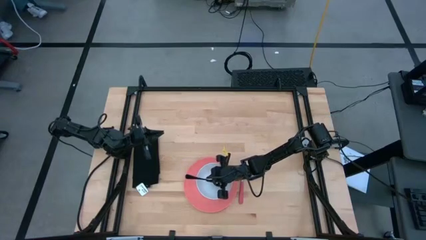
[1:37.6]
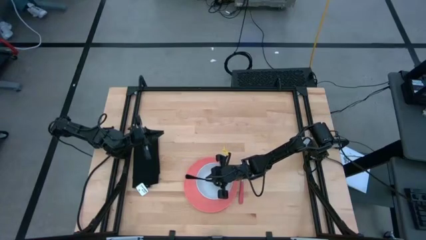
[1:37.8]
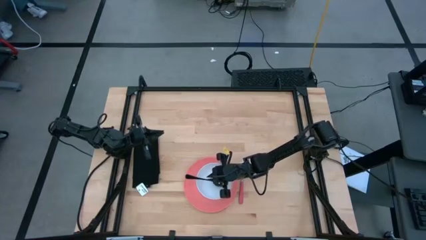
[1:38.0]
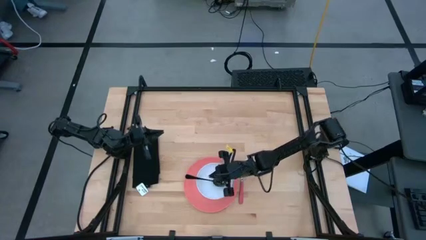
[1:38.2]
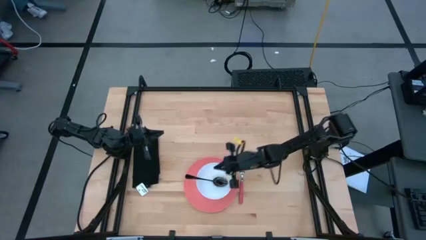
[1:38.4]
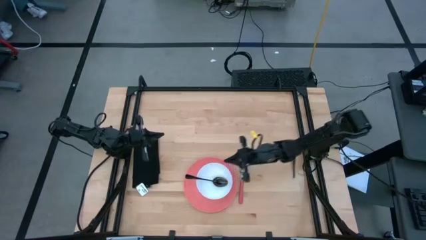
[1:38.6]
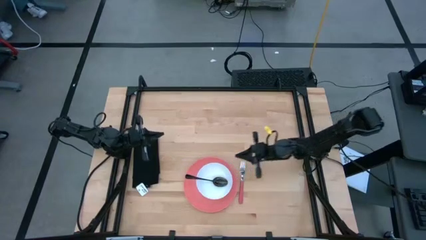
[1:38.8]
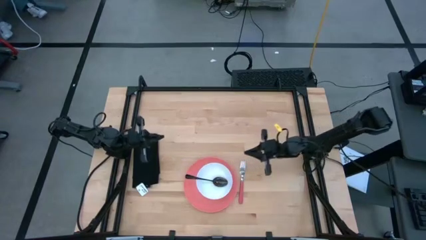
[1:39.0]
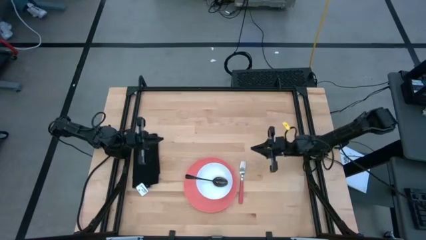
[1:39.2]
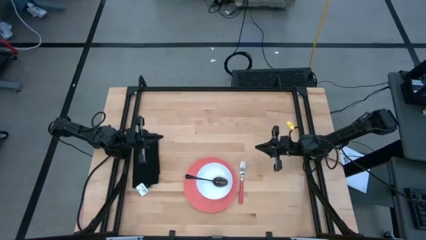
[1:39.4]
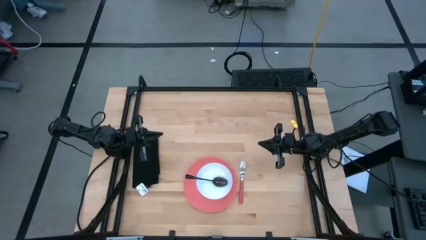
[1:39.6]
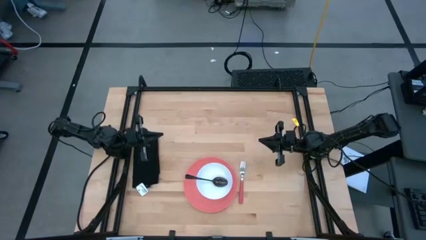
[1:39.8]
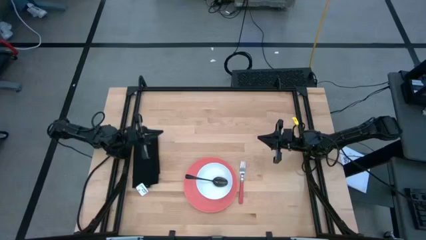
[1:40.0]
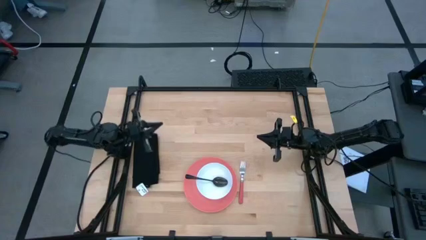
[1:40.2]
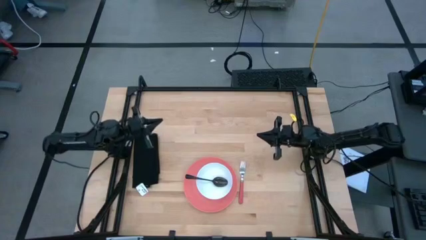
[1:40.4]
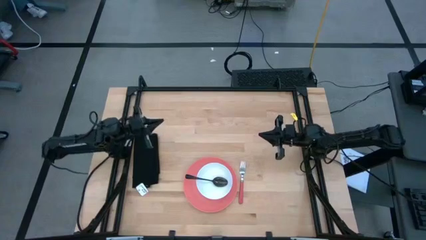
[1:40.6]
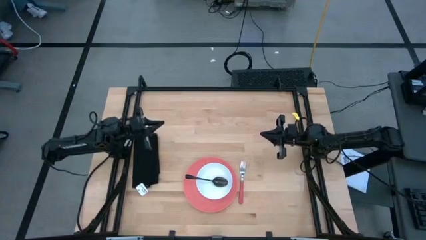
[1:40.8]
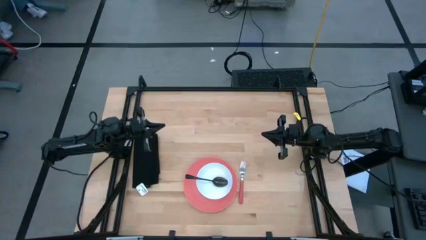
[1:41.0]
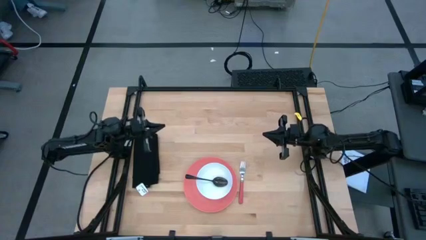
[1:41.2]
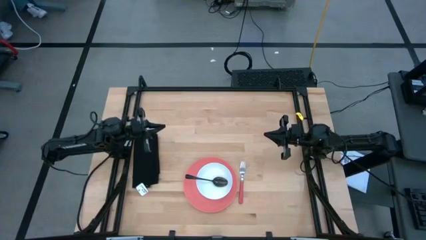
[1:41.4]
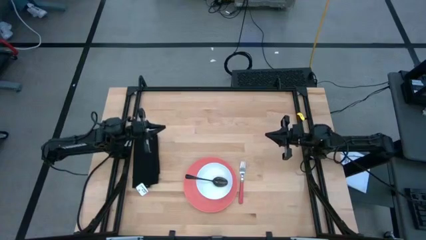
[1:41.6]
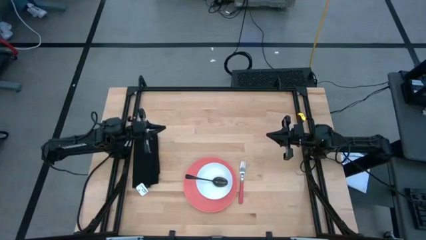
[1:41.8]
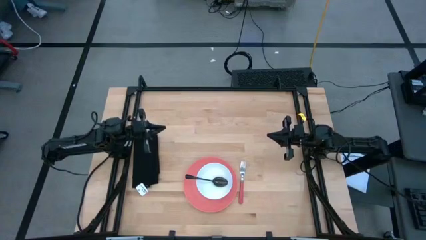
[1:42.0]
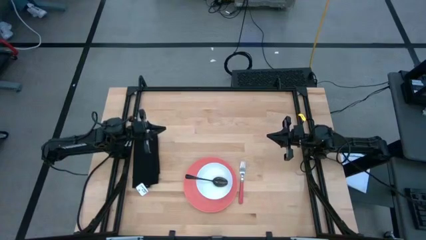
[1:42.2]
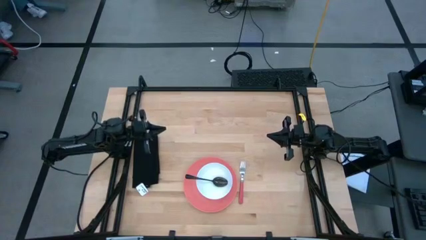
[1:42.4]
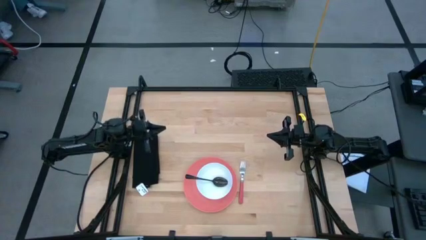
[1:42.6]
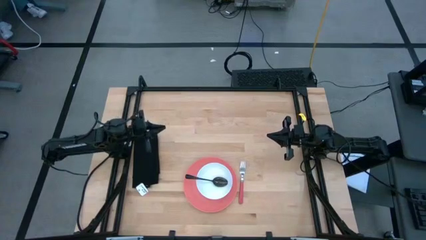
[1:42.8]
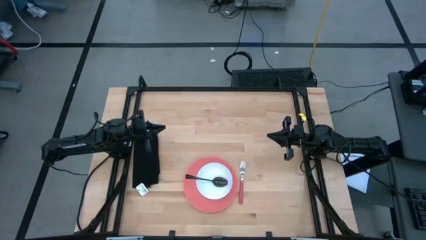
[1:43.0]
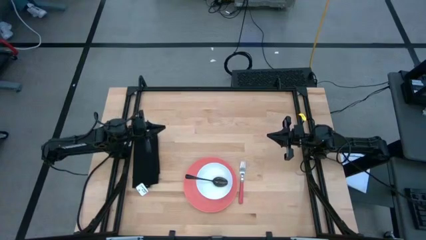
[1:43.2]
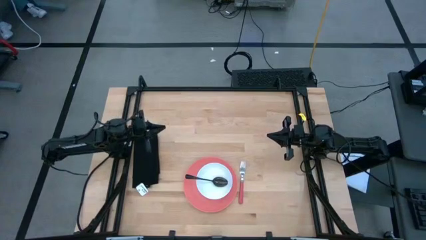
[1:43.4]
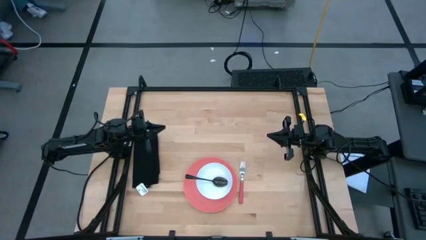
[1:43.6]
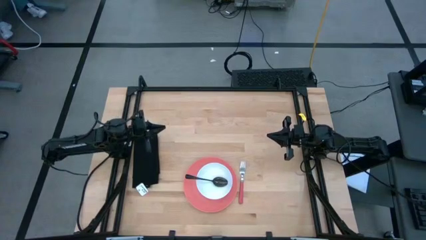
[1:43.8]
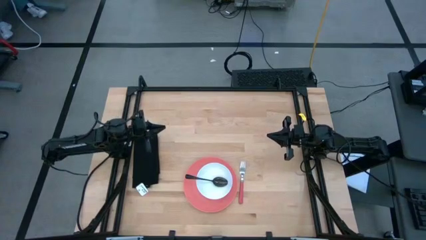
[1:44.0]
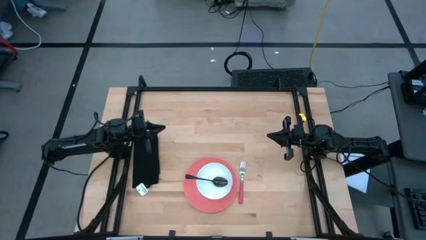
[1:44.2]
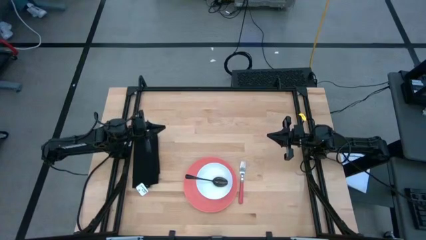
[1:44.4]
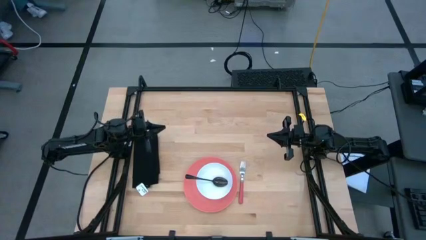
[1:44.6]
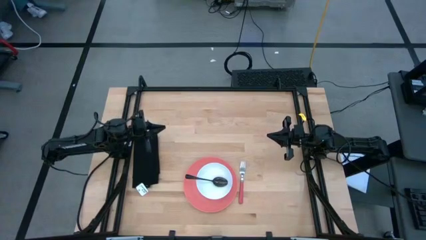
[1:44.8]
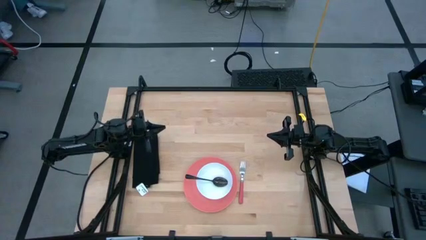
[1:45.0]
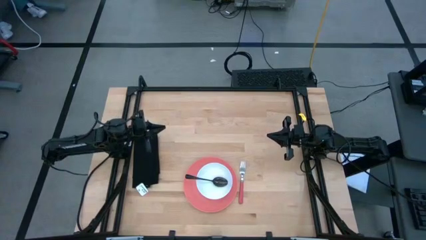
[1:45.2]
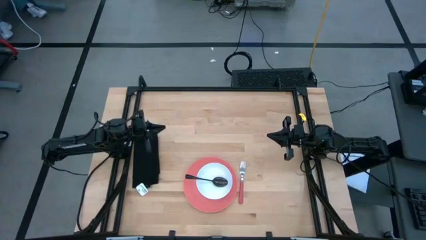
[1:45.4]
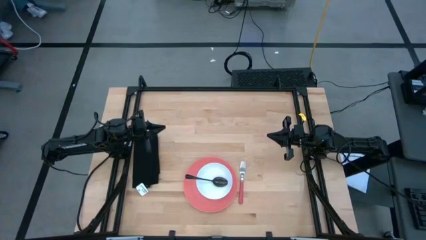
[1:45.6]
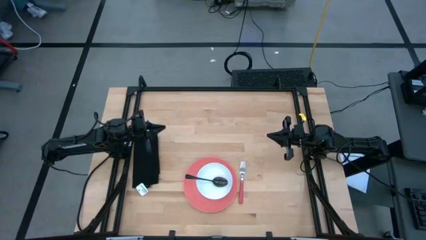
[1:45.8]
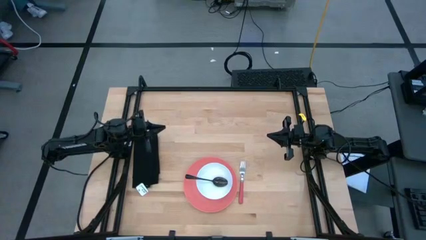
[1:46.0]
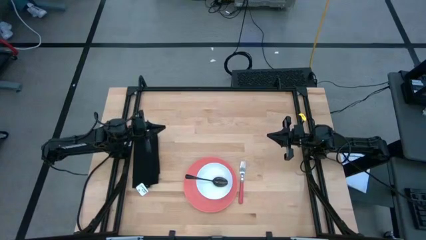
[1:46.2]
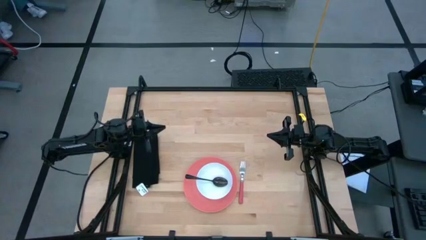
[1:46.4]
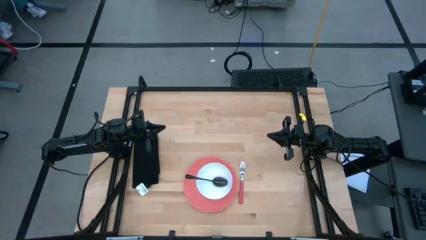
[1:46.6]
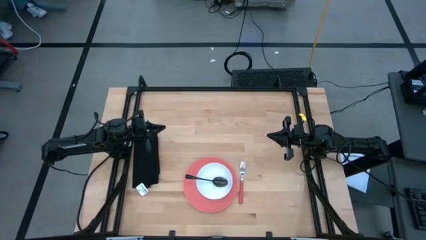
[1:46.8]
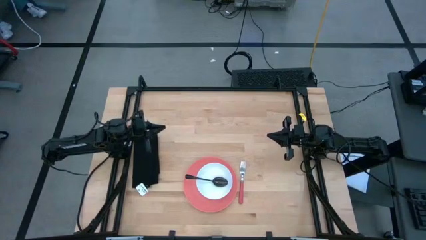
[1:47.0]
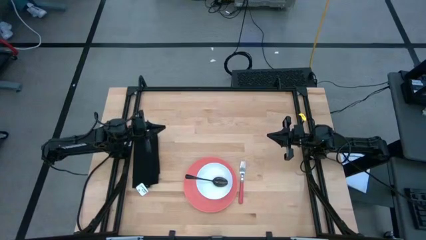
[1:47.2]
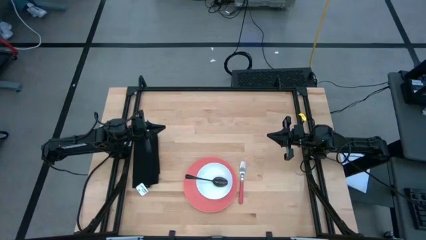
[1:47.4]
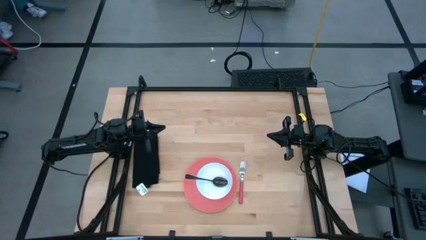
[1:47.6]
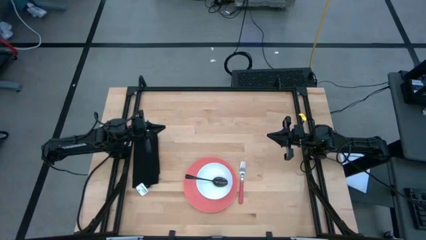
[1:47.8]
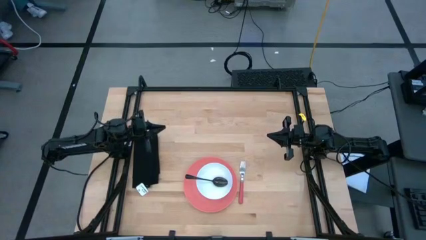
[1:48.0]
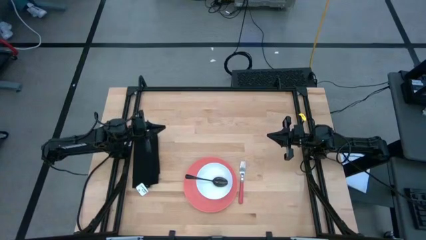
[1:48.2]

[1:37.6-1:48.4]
Task: Set table place
Return to Home Position
